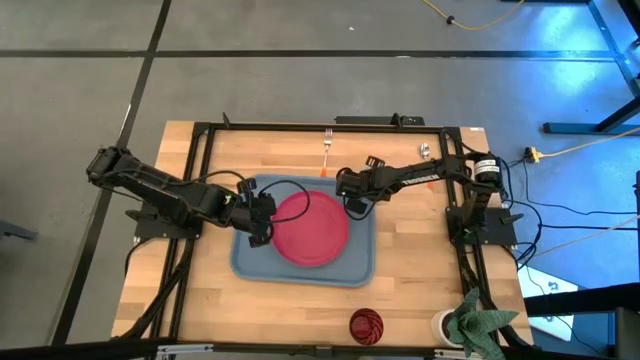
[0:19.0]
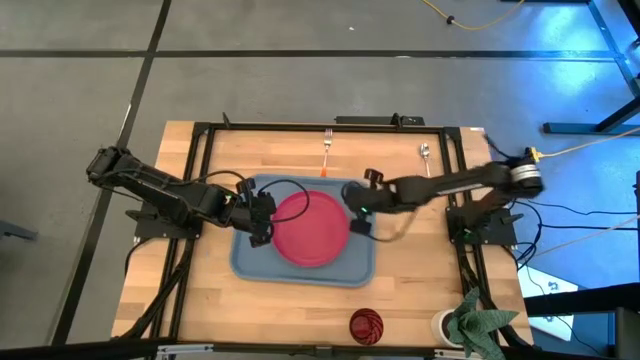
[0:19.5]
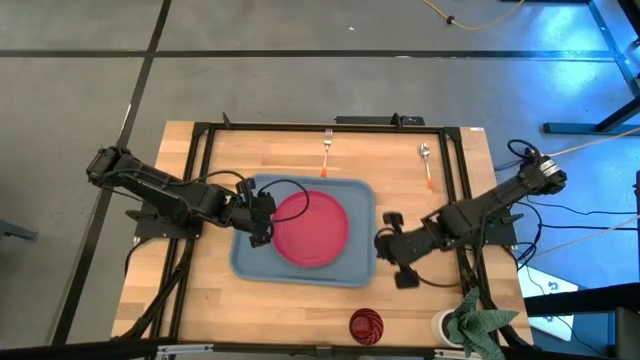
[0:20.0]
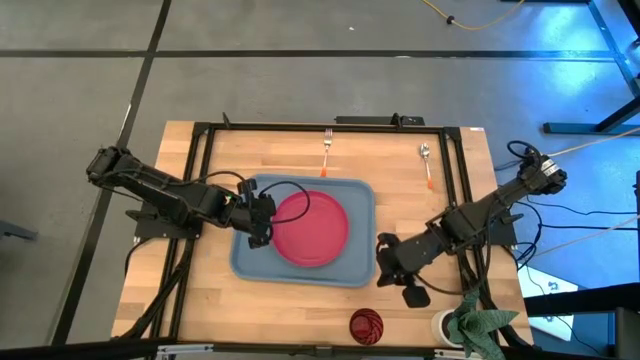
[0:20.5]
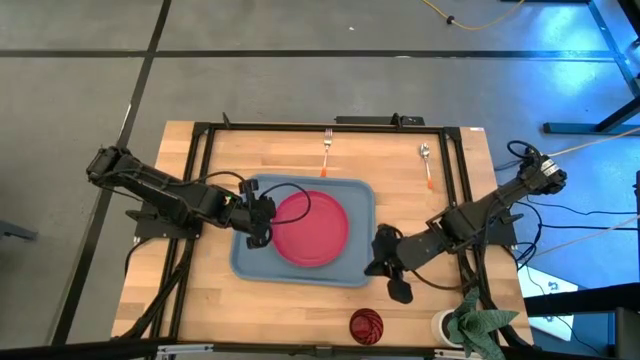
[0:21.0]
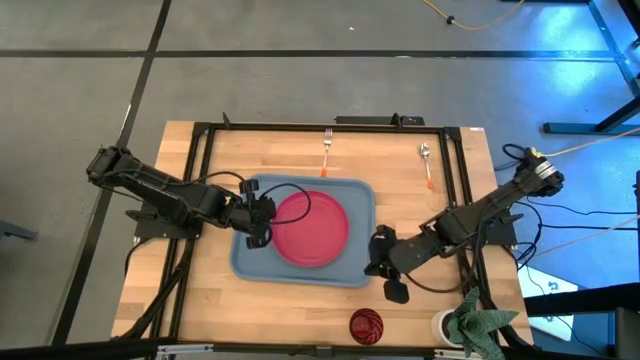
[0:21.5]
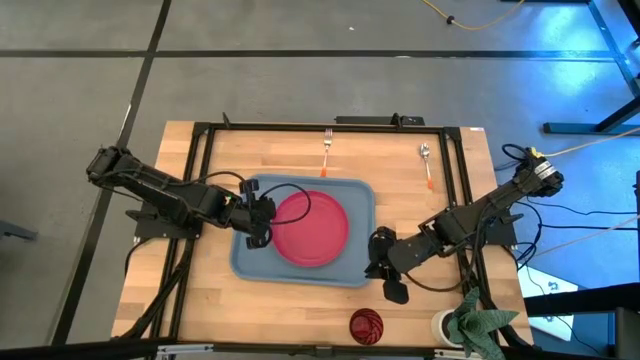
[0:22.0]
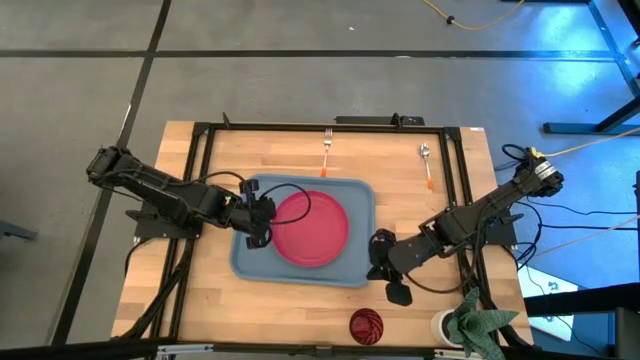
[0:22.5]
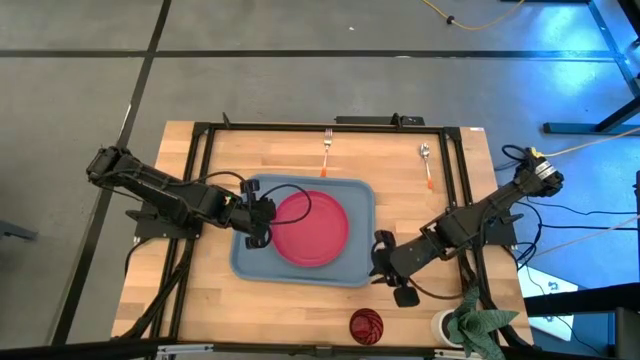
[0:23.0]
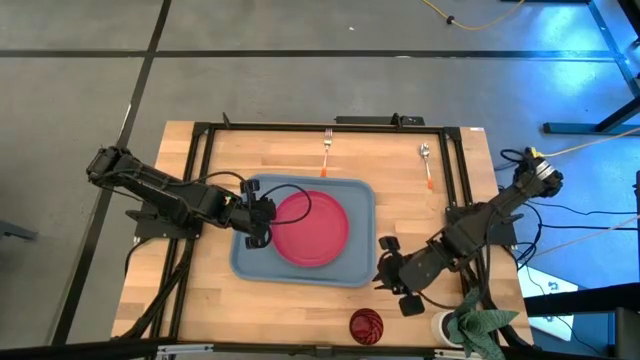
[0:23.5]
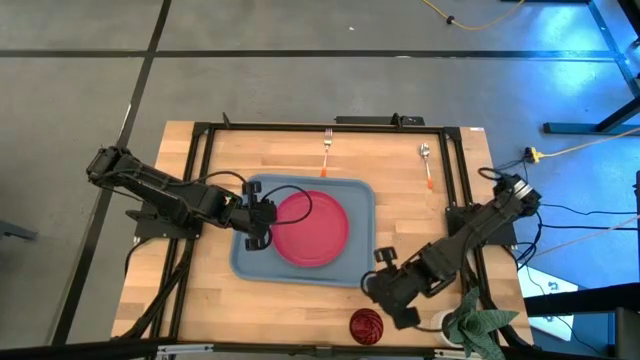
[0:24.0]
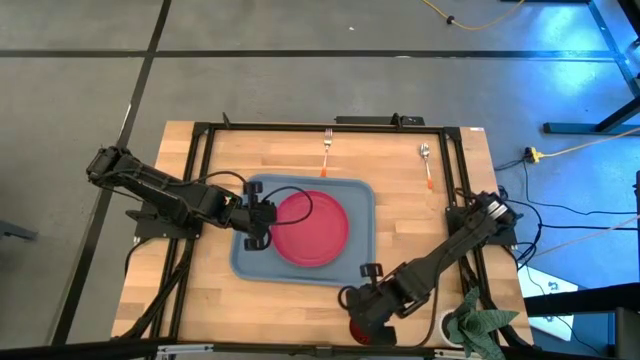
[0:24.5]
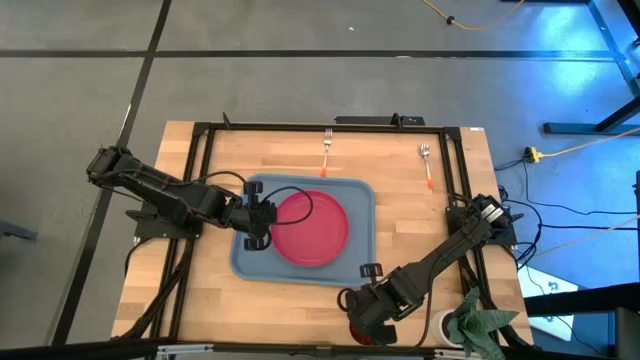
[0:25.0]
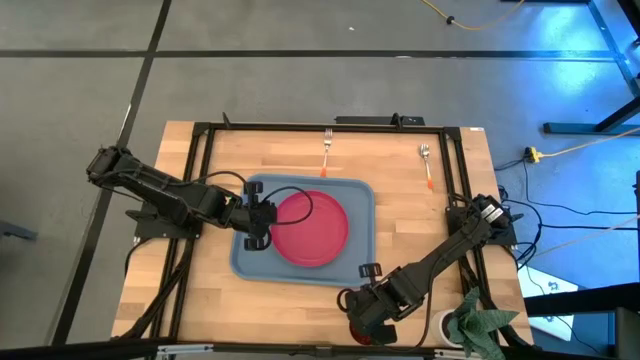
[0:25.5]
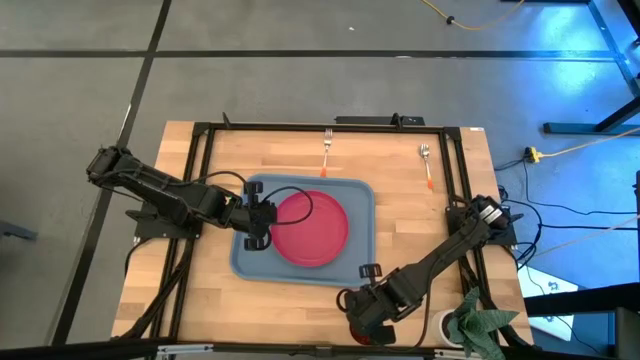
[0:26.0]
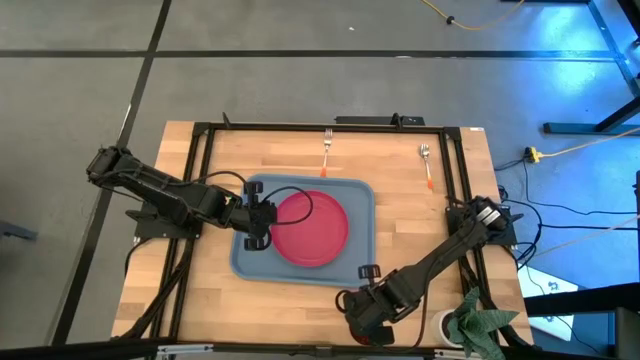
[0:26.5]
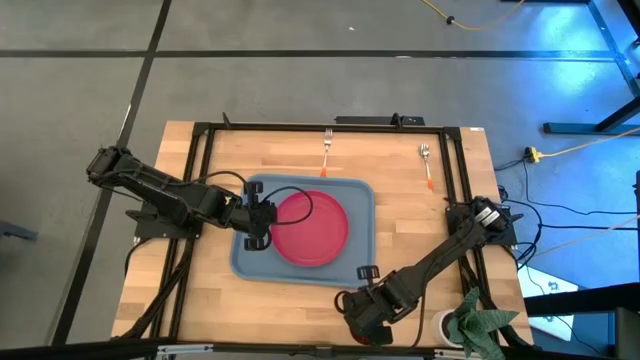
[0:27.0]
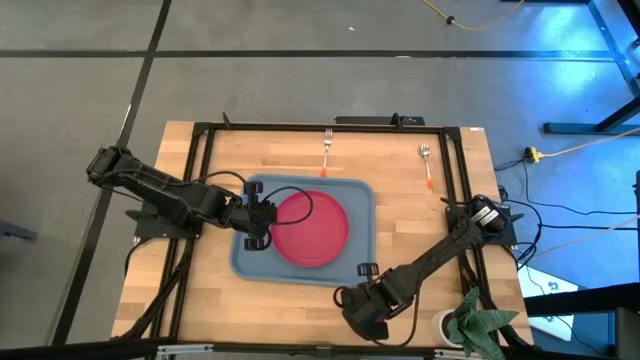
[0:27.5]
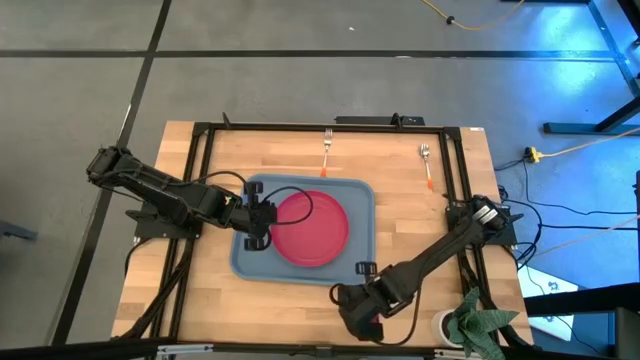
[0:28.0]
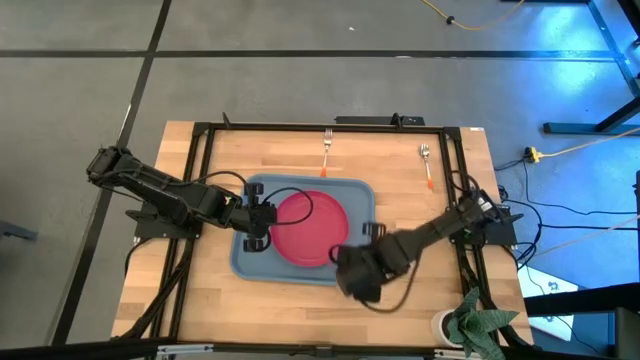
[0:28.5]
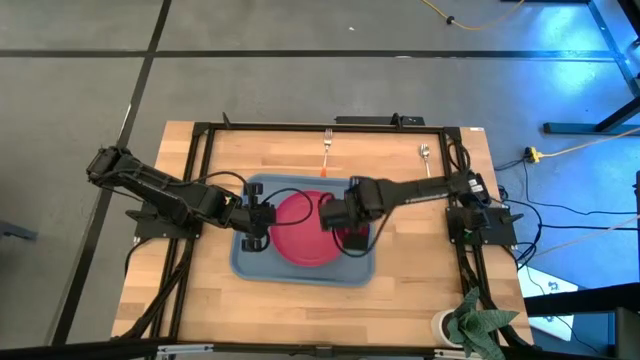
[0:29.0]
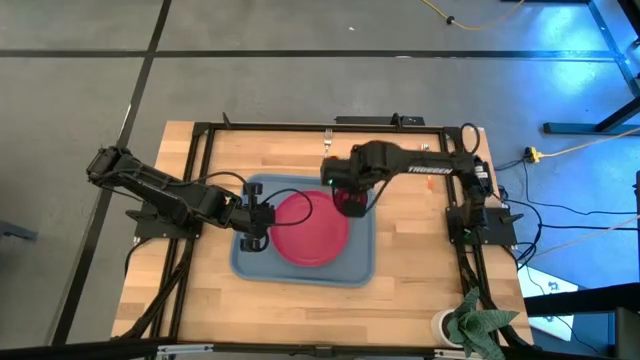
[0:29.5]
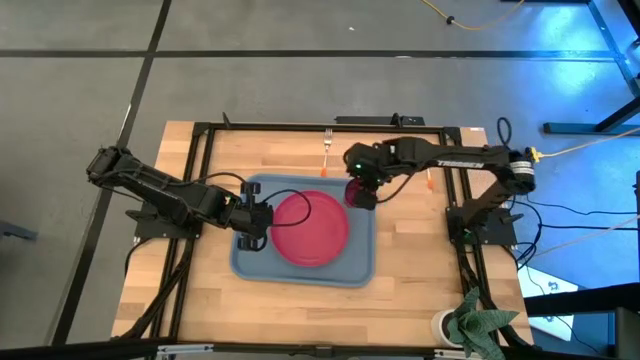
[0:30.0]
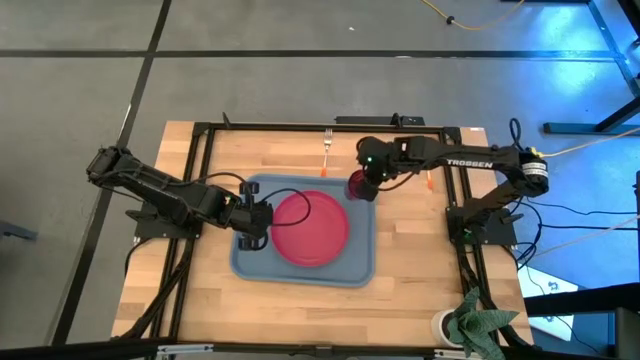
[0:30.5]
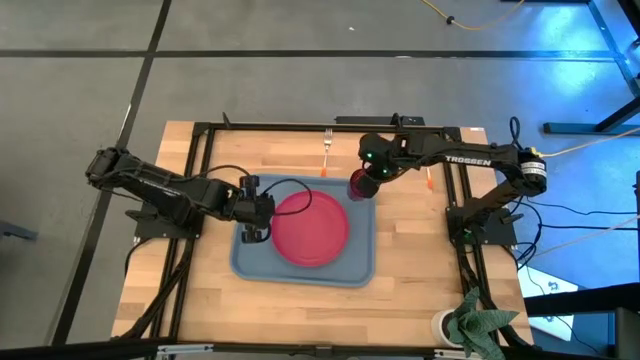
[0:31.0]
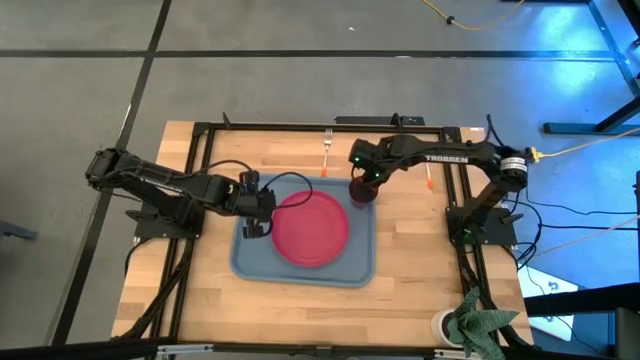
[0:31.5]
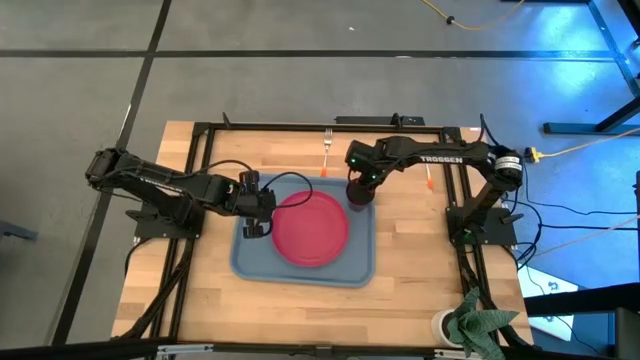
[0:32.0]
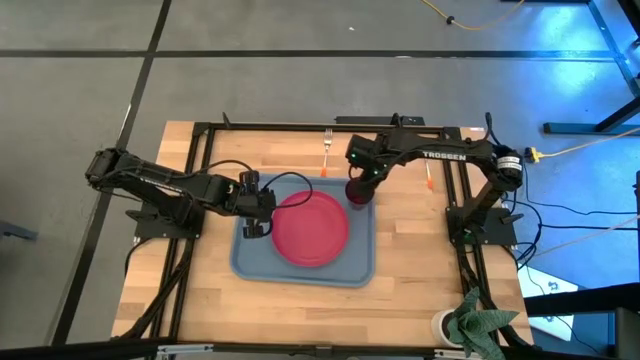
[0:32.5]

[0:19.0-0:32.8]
Task: Pick and place plate/cup/fork/spoon on tray
Put the red glass on the blue serving tray to the top right of the red plate

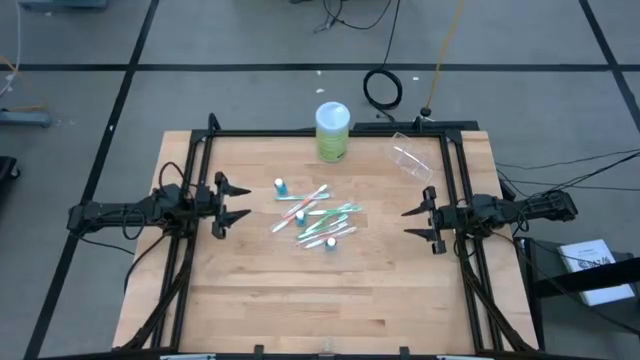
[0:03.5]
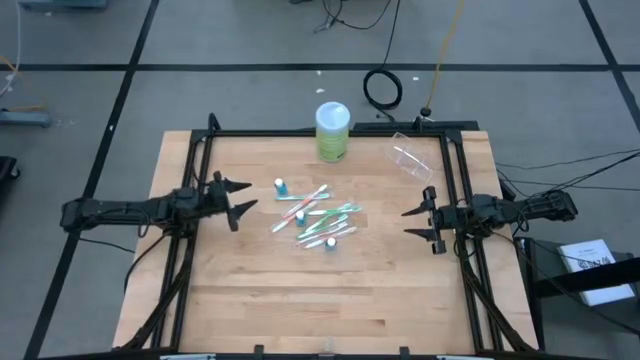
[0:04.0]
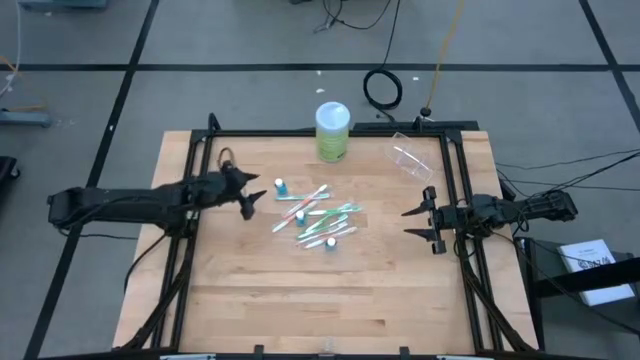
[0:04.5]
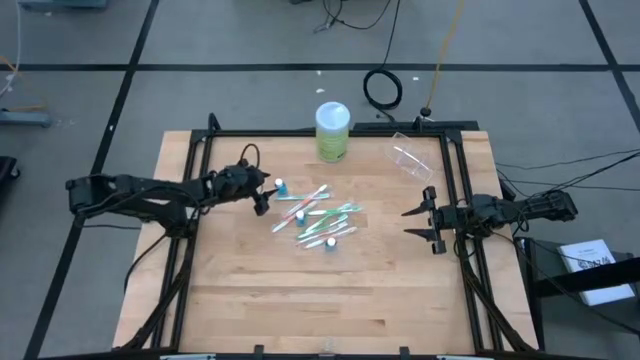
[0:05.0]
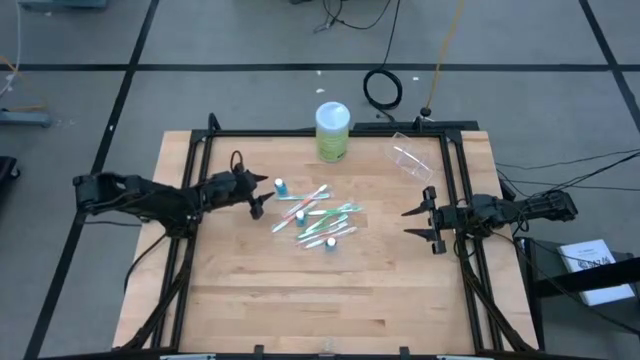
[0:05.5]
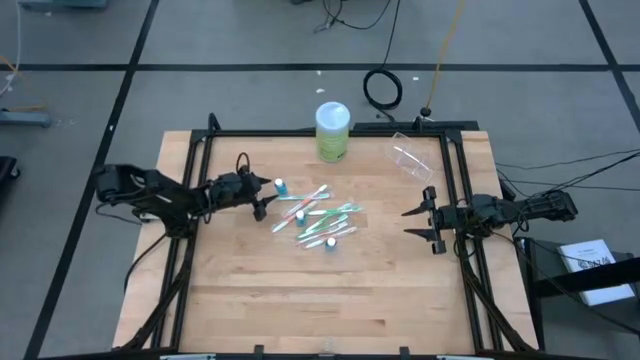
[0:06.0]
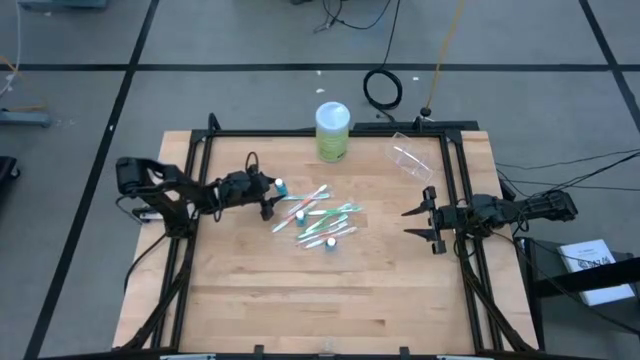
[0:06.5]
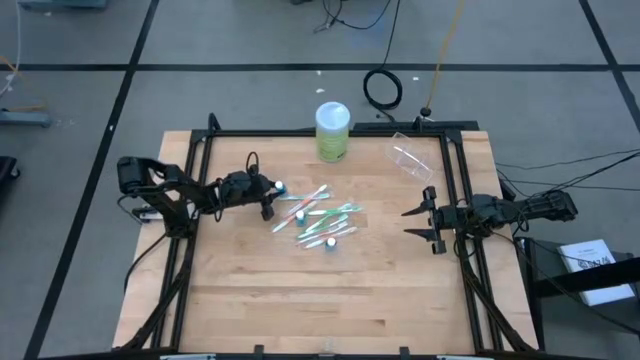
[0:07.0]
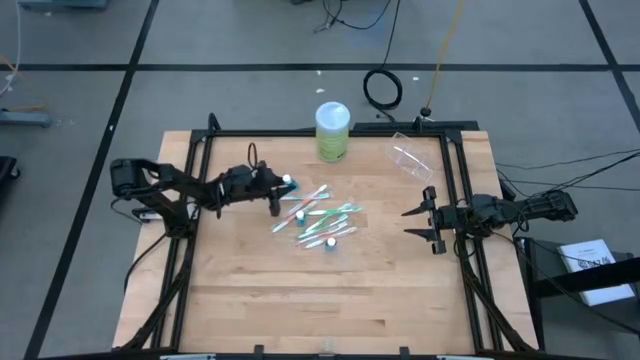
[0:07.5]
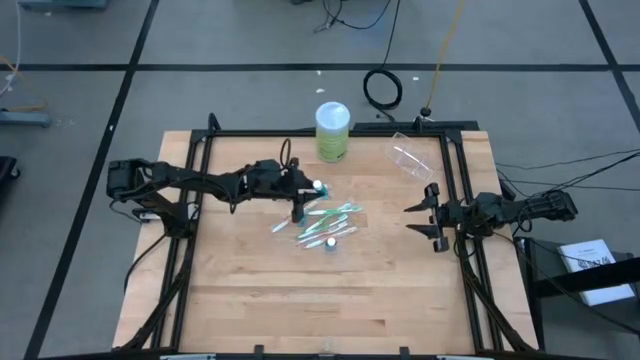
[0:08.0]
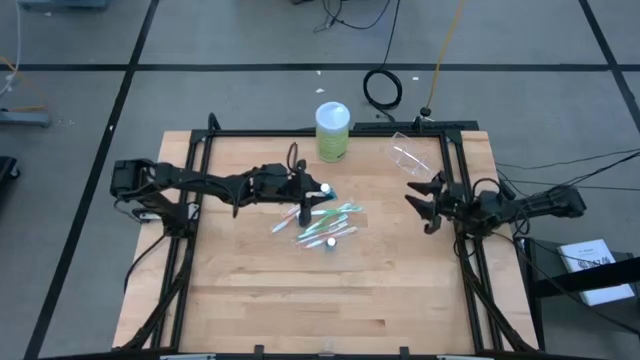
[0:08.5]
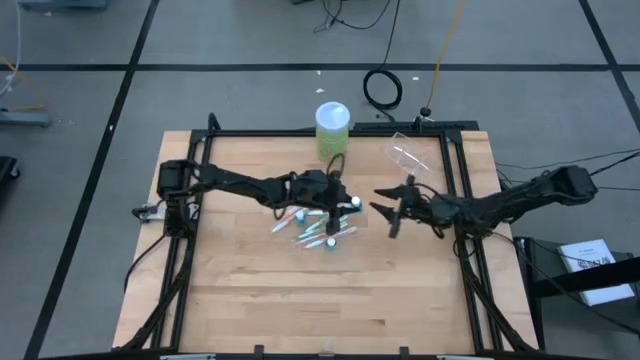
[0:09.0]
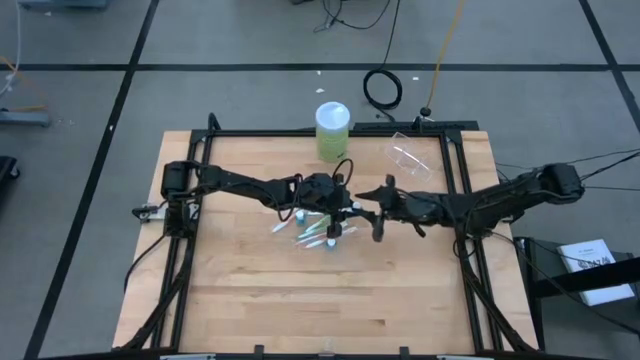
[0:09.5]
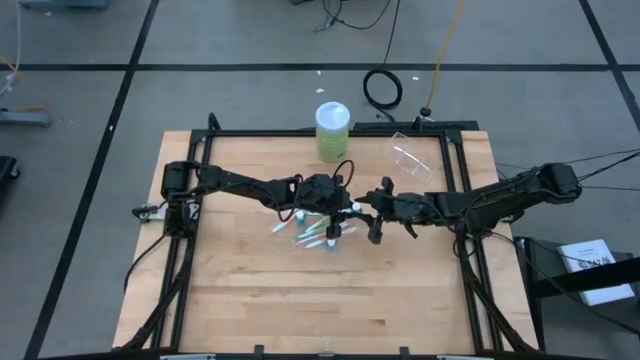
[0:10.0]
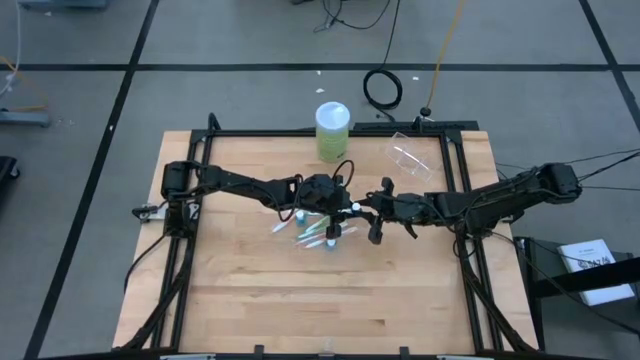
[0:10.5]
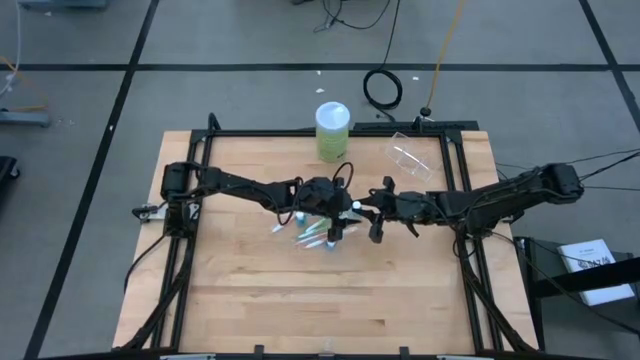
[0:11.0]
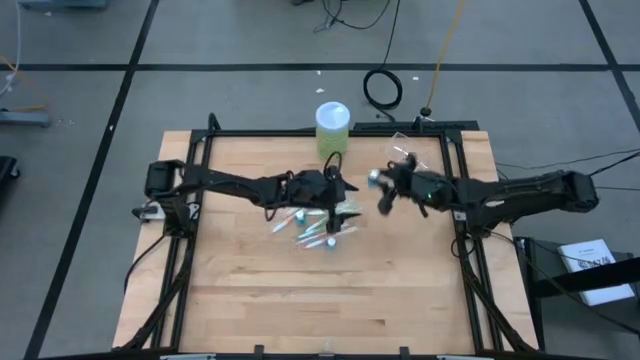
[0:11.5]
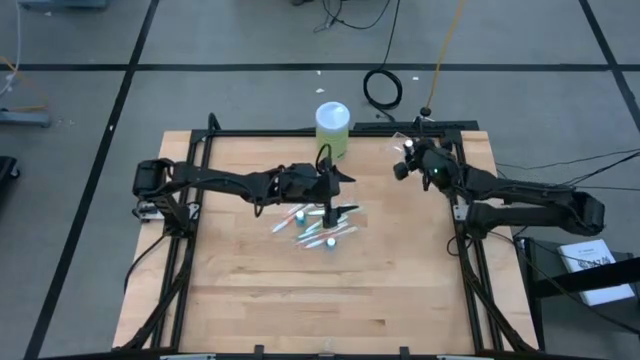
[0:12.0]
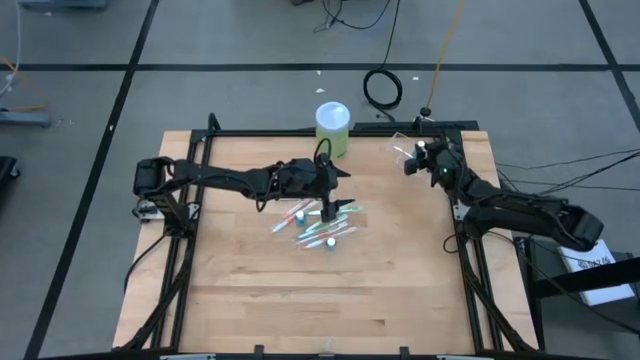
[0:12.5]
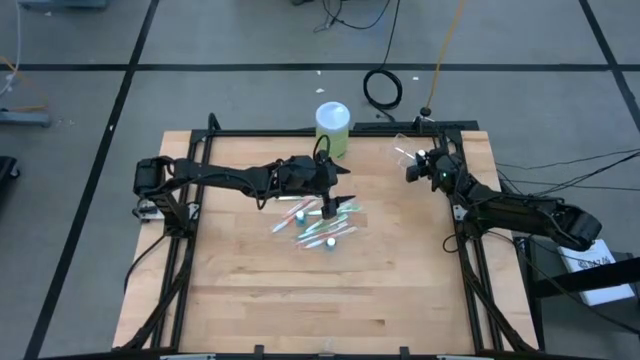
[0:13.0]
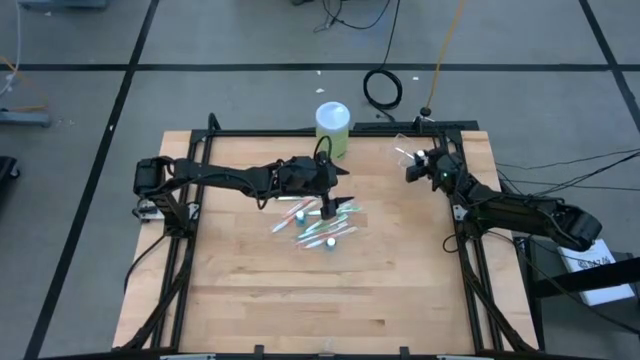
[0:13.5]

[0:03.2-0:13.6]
Task: Pick & Place toothbrushing station
Put the blue mouthwash bottle into the transparent organizer
